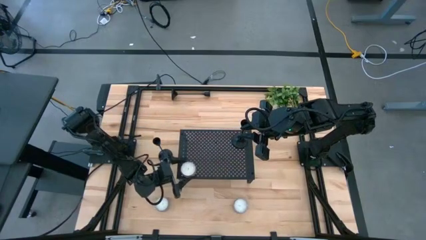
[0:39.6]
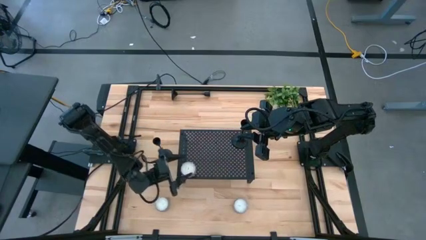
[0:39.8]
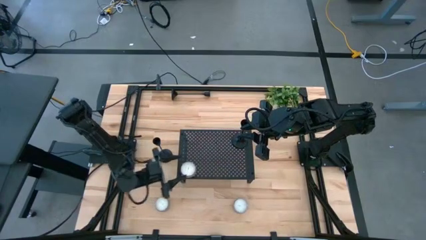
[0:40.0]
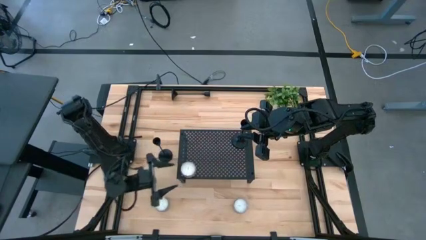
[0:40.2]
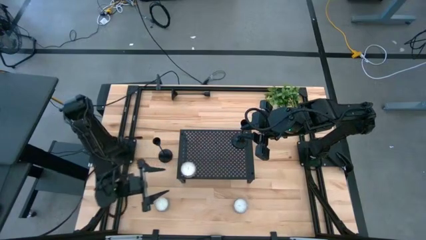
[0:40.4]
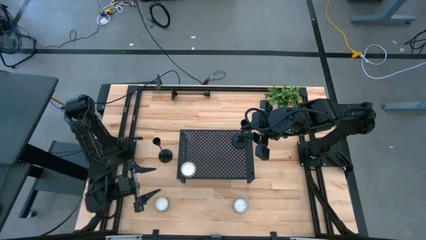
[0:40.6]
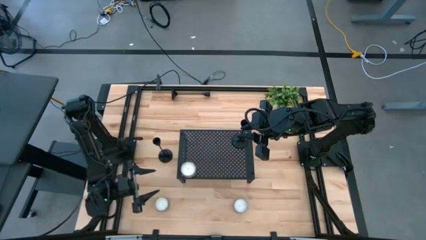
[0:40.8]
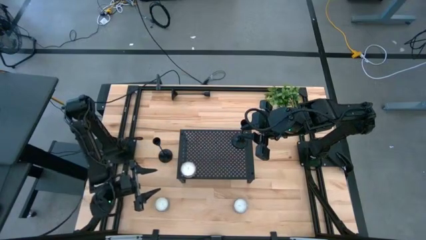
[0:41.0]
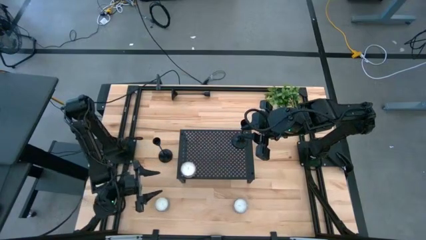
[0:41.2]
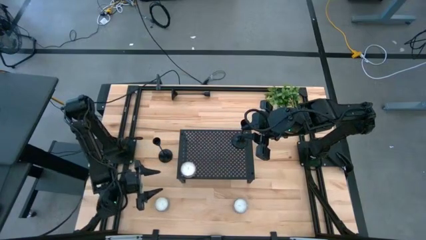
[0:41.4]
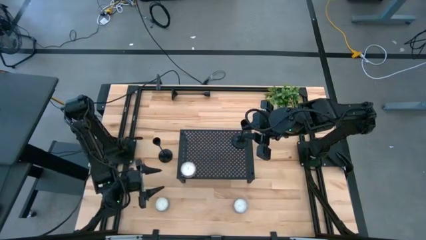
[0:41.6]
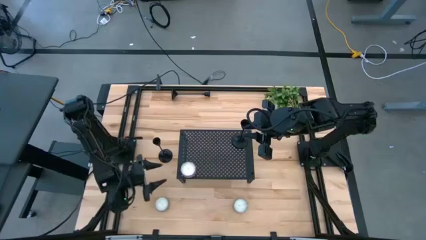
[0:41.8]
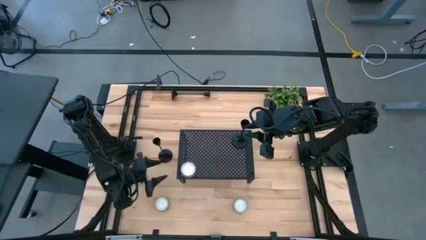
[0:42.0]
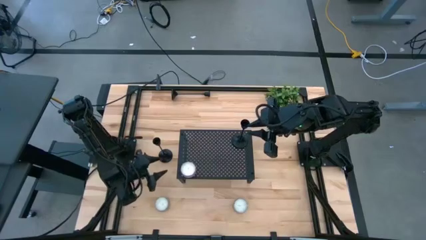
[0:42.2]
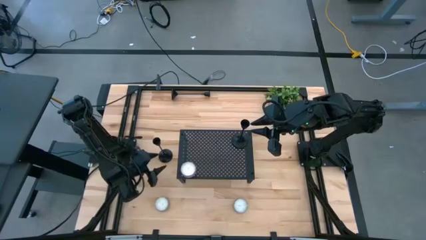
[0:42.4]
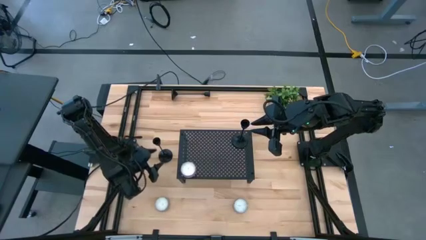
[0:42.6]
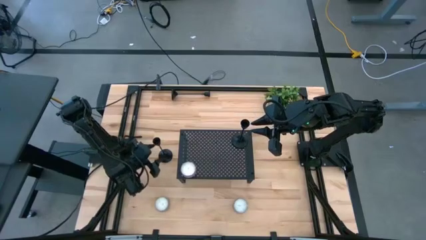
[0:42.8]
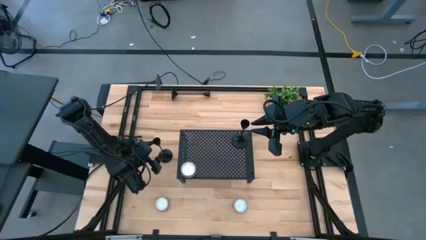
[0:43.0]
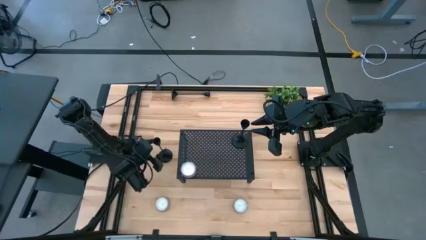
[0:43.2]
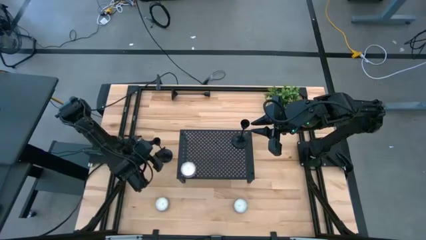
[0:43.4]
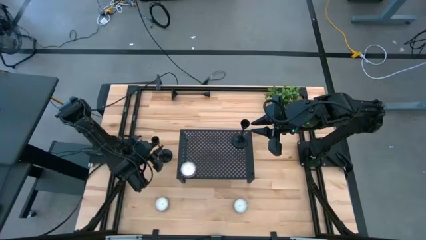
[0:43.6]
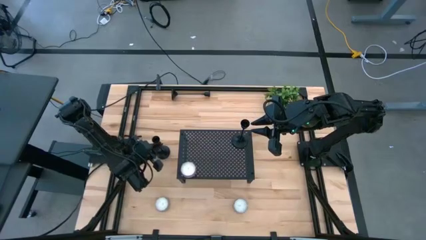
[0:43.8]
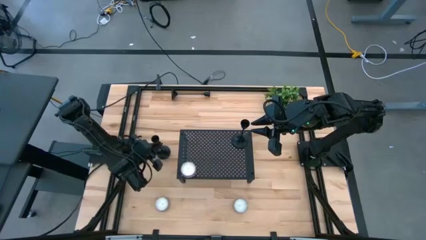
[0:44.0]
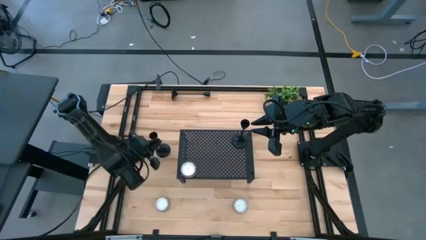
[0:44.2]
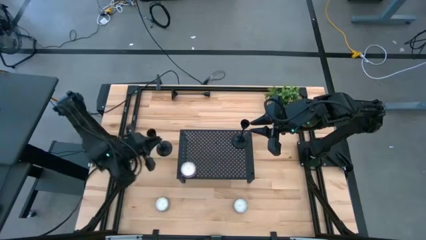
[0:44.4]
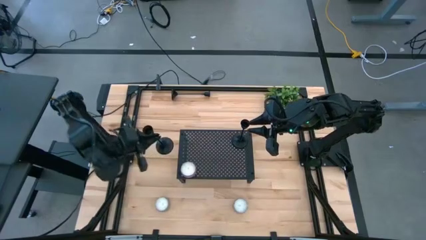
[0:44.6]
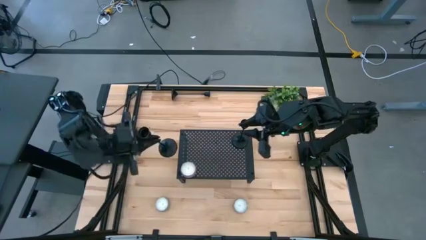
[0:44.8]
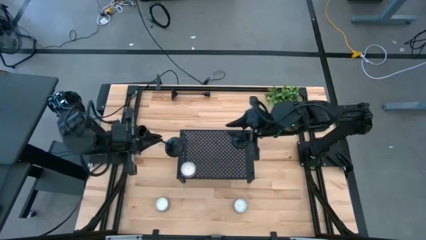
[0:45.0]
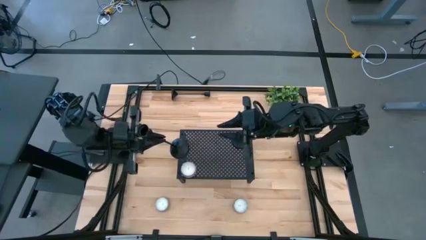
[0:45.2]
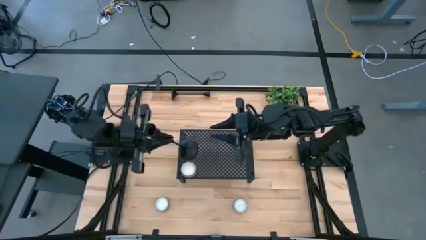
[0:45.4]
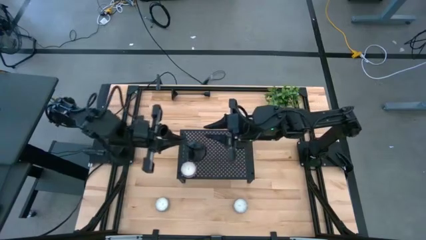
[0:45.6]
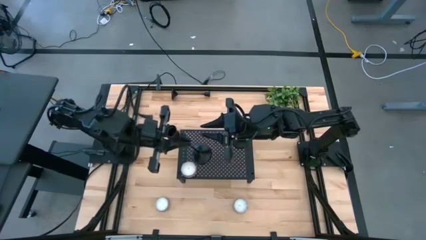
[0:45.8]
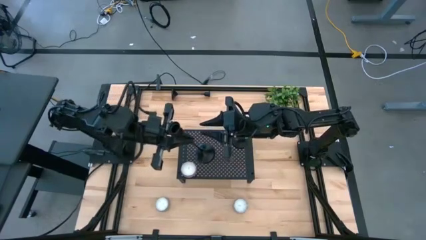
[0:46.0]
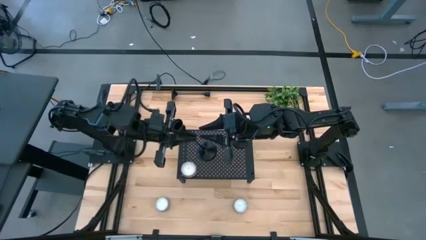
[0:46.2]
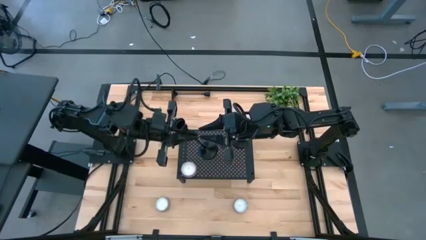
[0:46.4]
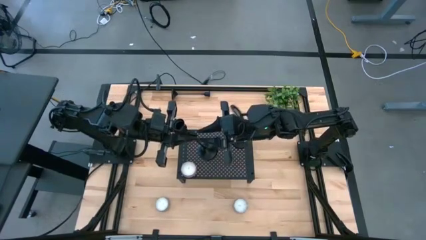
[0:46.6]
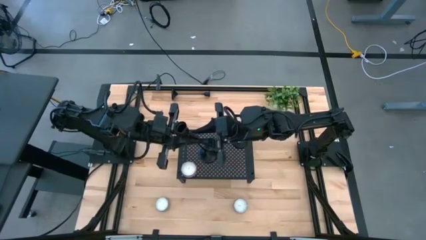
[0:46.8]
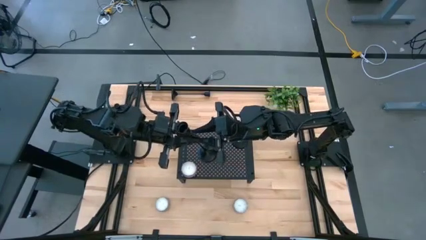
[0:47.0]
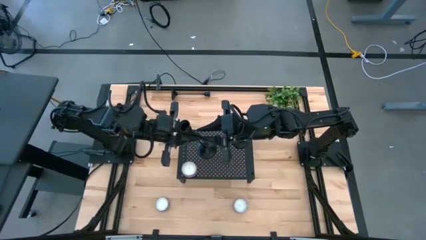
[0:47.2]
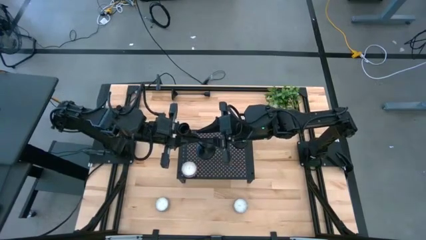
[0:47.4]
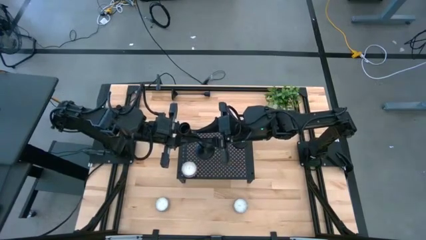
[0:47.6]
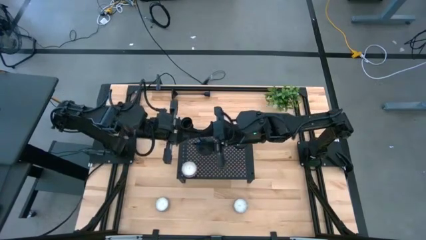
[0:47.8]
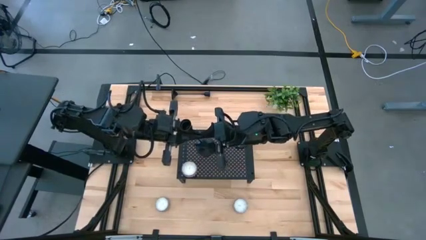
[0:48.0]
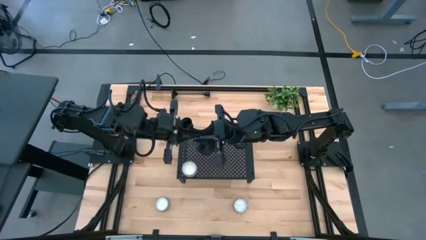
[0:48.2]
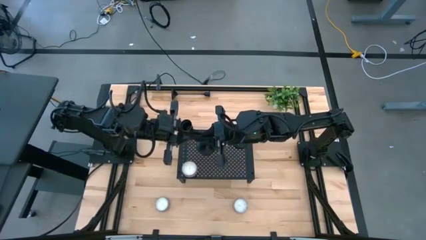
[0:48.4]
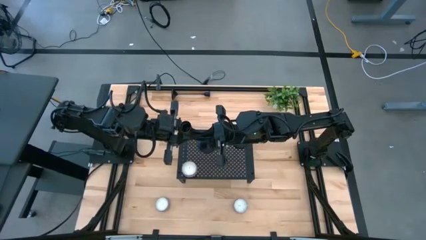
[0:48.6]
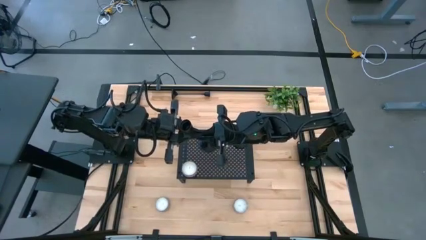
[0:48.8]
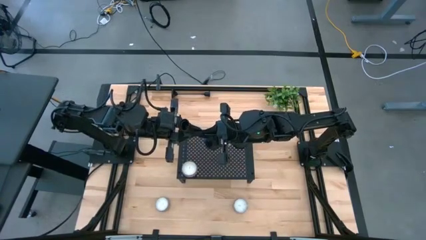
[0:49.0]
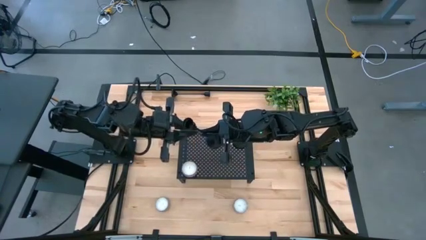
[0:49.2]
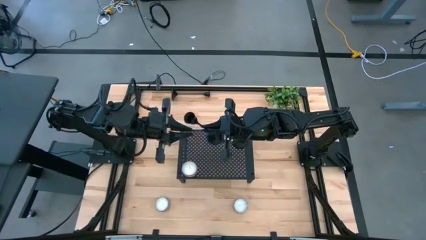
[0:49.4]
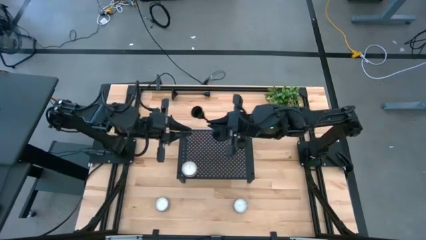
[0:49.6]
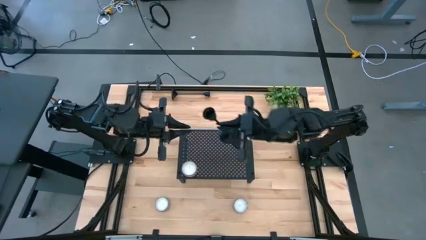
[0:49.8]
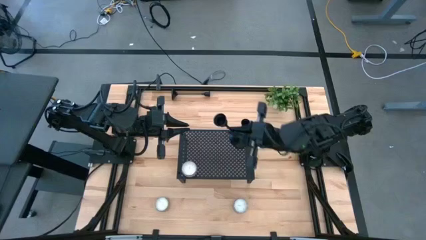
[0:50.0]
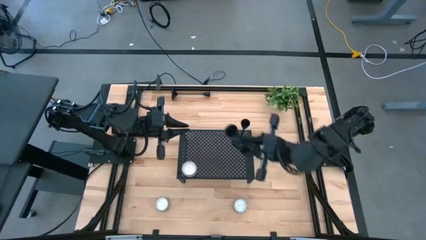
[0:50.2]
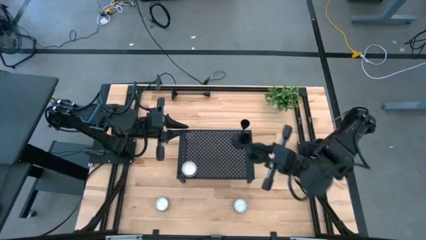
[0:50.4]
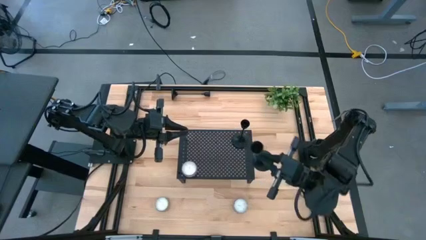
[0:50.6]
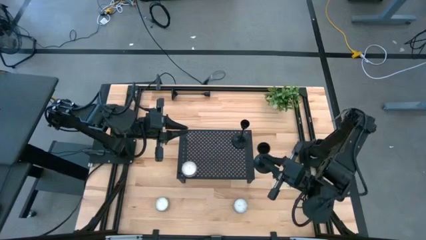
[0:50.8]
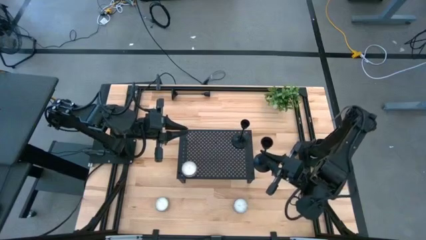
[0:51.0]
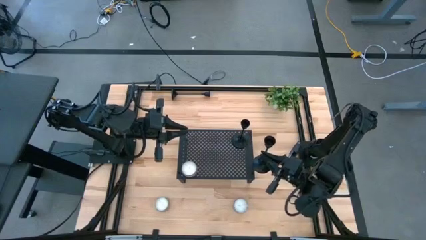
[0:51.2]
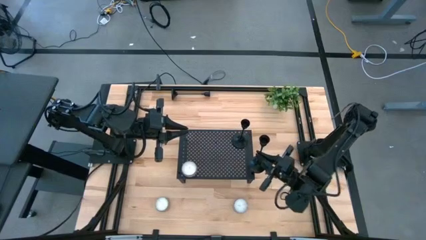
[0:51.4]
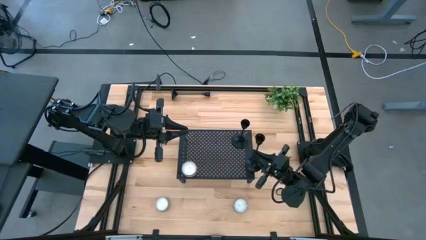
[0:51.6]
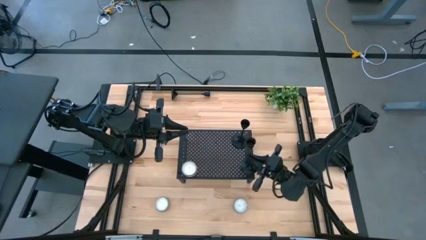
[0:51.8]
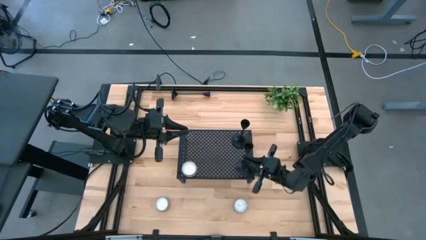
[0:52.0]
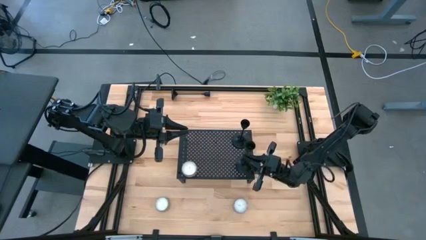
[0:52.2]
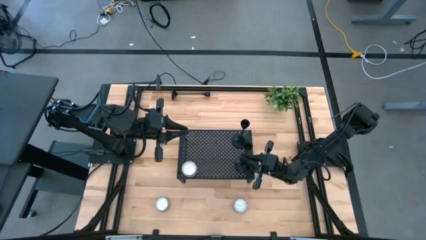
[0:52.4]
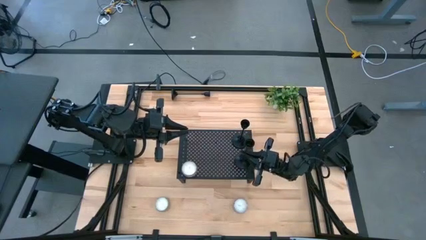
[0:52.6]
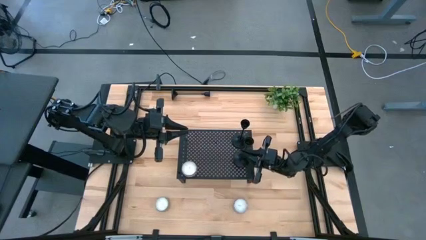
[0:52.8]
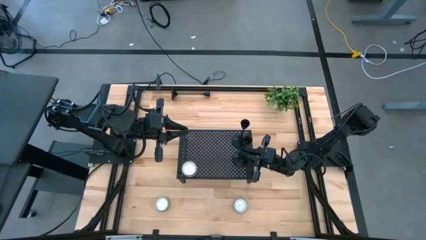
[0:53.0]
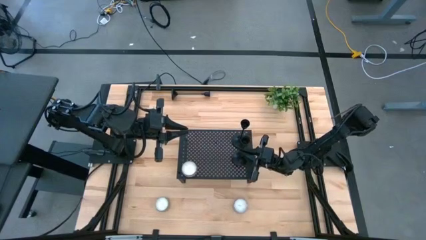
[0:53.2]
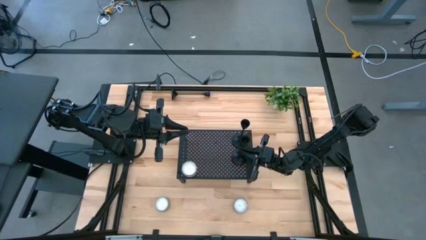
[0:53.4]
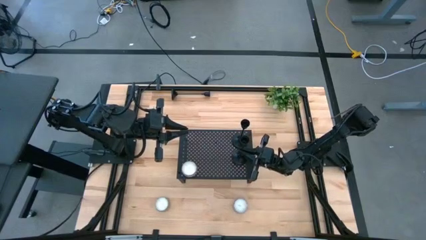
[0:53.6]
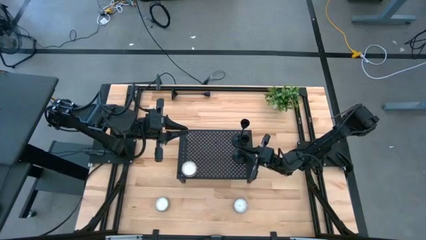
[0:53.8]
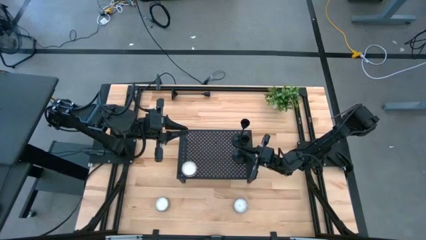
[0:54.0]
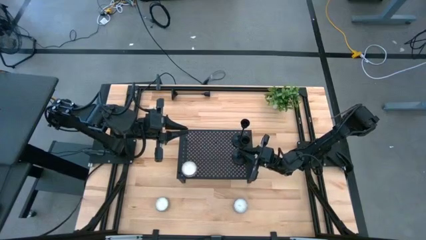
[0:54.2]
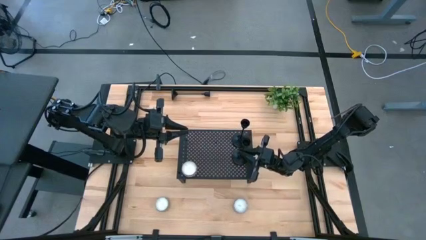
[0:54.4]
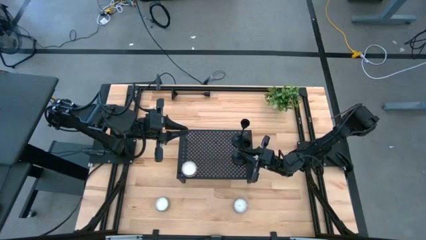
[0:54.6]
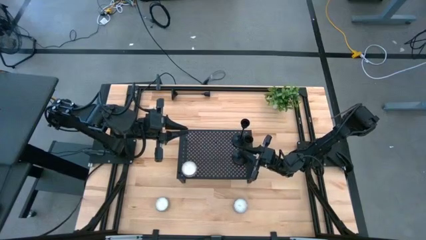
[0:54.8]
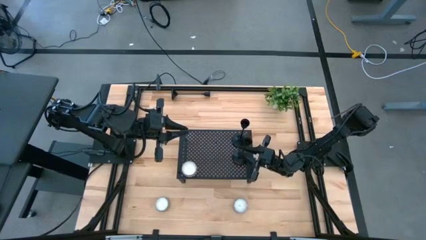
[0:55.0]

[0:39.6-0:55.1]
Task: Pick & Place candle stick holders
Put the bottom black candle holder on the shelf aligned with the other black candle holder

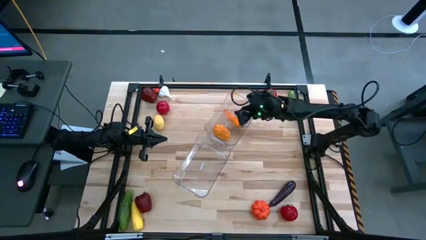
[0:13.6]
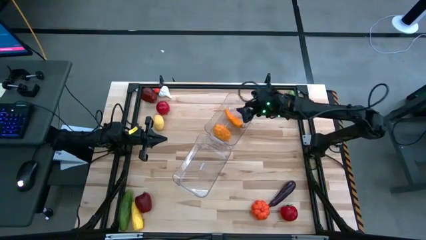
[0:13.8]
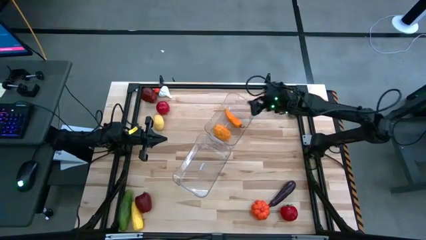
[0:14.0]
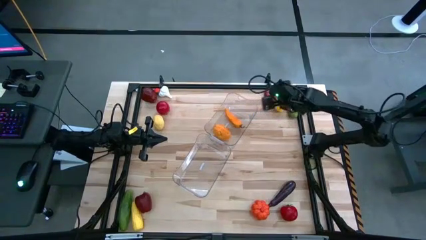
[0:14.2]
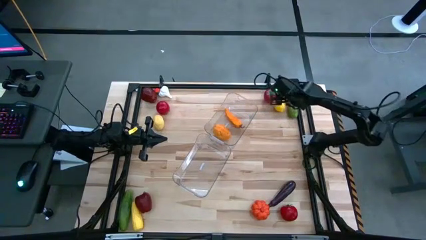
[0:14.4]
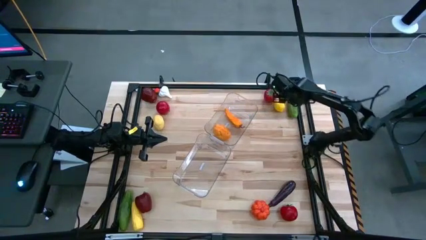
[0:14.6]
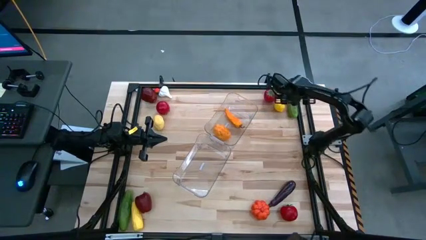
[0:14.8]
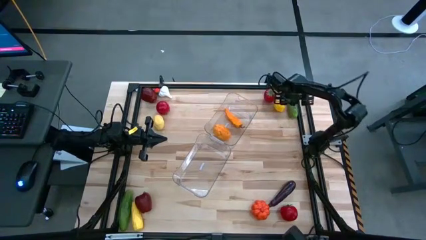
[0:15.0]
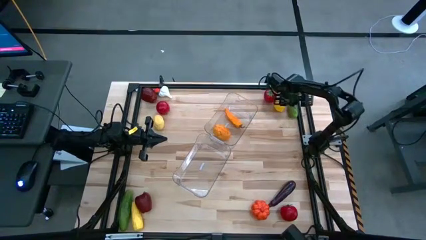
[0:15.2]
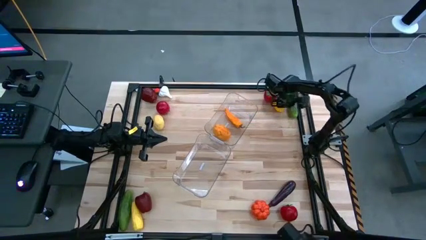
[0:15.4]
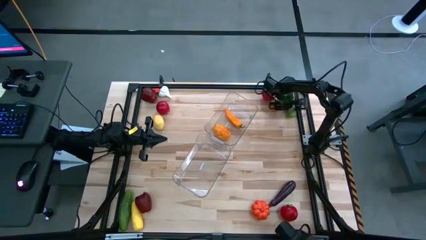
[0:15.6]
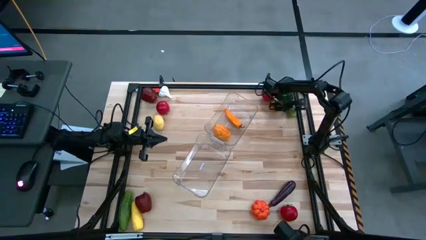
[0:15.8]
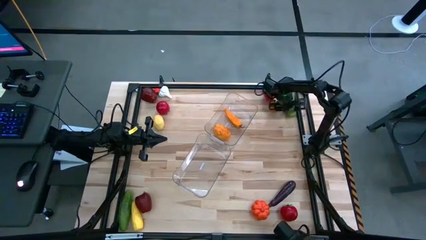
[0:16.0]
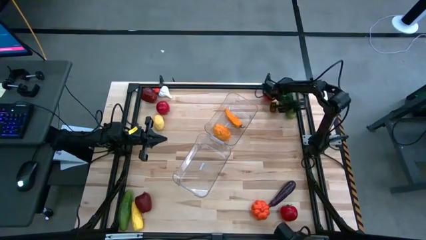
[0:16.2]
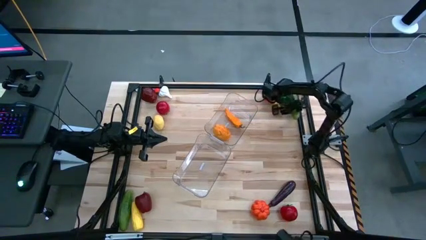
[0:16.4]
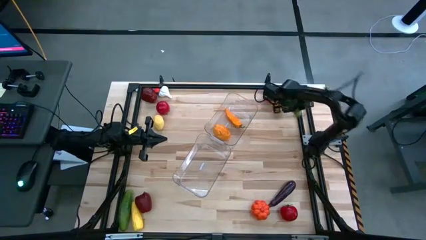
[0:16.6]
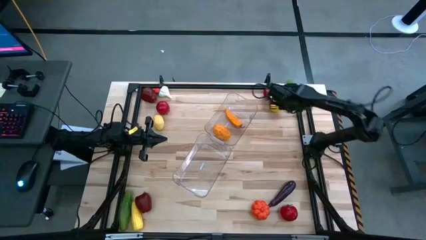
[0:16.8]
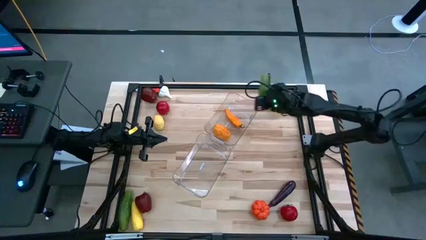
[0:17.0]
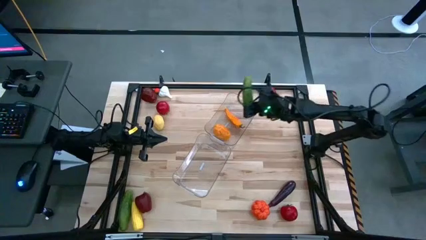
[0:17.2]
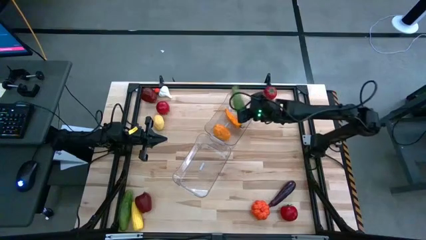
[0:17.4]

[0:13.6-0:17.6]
Task: Sort produce into baskets
Put the top green cucumber into the top transparent bin
